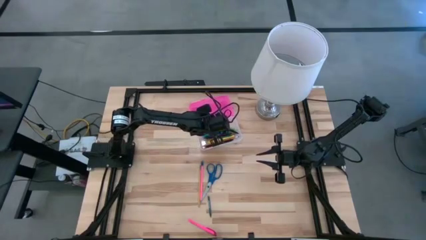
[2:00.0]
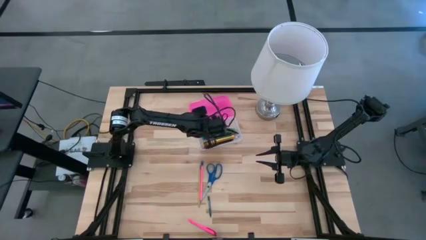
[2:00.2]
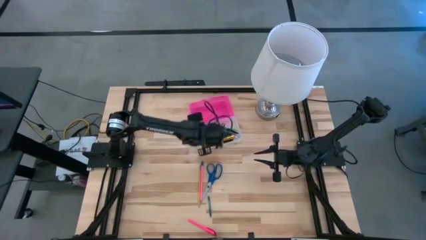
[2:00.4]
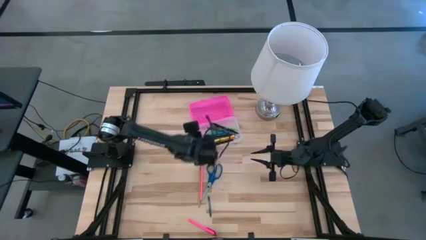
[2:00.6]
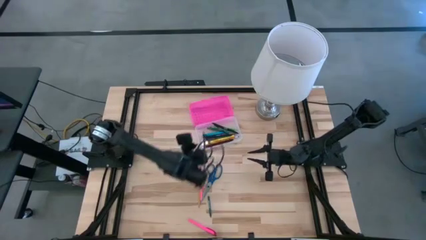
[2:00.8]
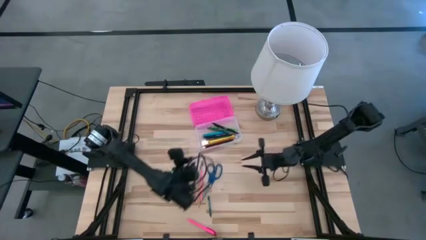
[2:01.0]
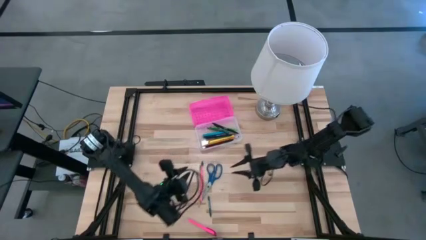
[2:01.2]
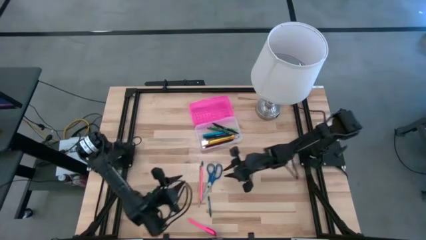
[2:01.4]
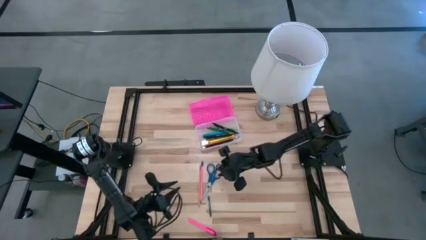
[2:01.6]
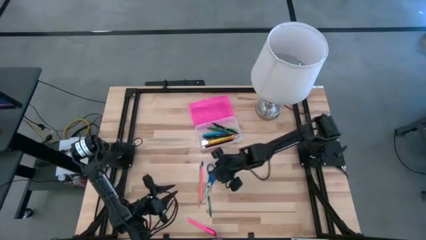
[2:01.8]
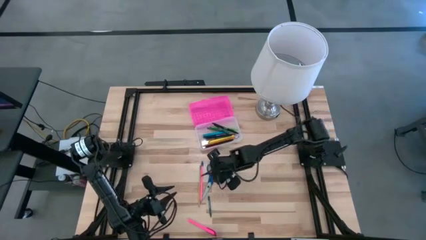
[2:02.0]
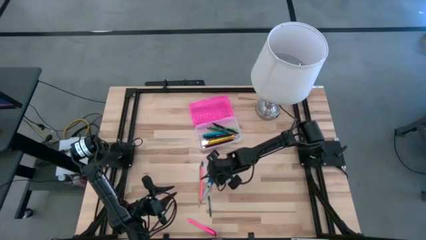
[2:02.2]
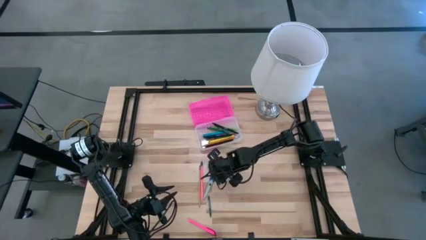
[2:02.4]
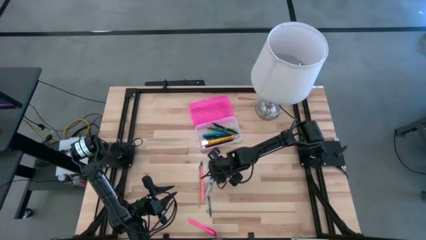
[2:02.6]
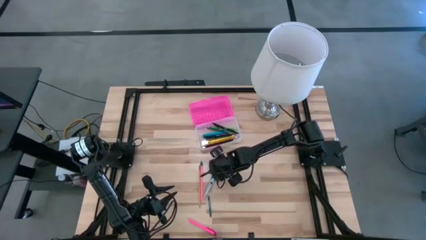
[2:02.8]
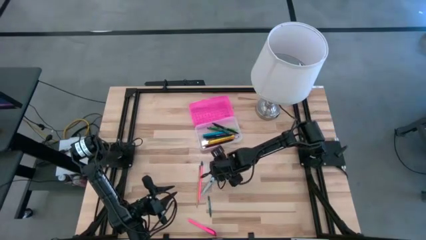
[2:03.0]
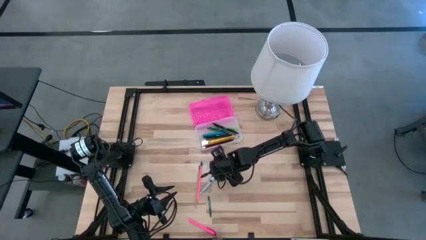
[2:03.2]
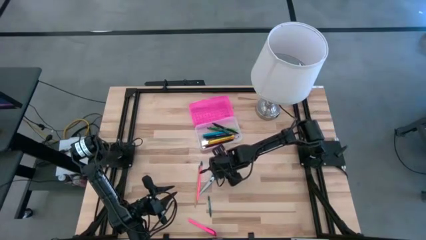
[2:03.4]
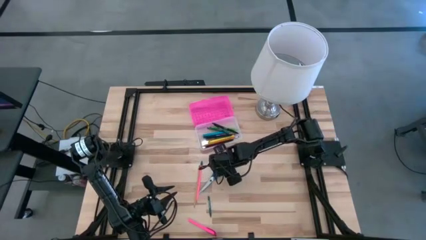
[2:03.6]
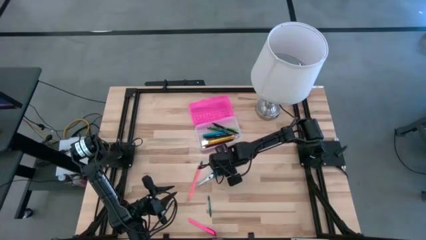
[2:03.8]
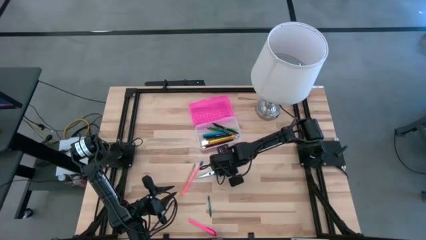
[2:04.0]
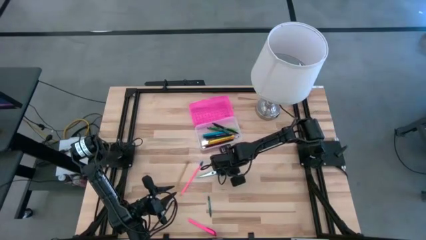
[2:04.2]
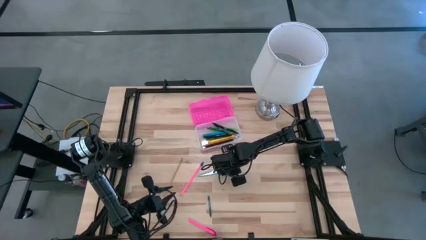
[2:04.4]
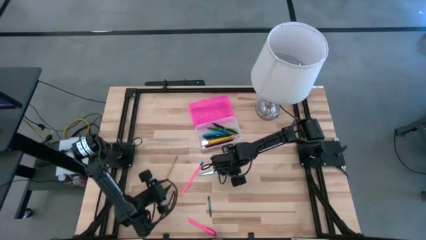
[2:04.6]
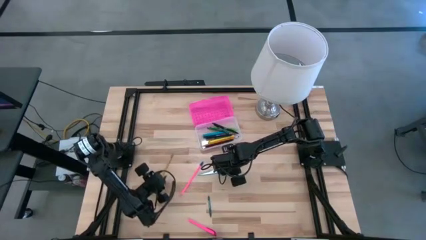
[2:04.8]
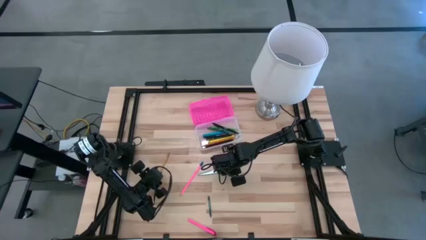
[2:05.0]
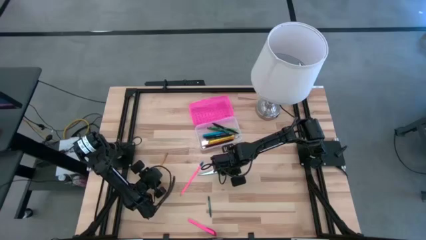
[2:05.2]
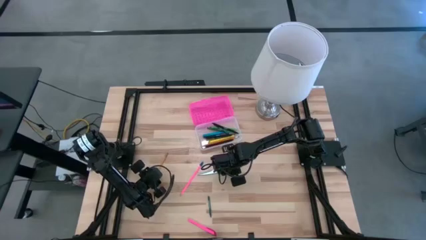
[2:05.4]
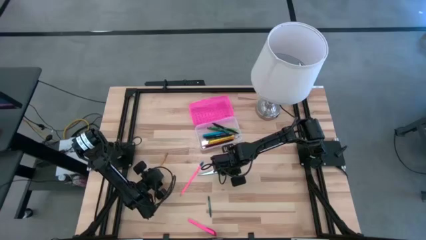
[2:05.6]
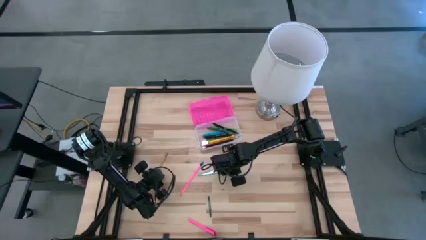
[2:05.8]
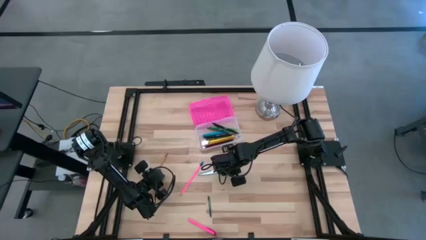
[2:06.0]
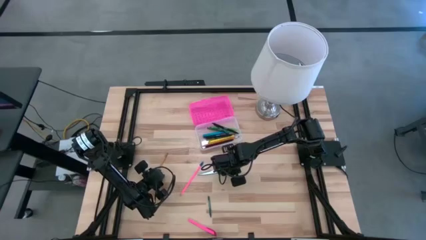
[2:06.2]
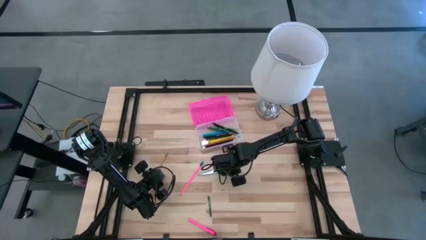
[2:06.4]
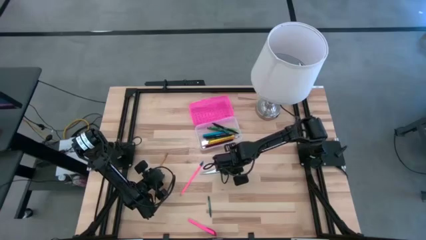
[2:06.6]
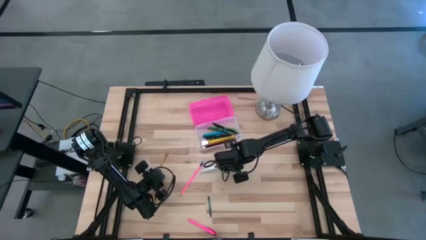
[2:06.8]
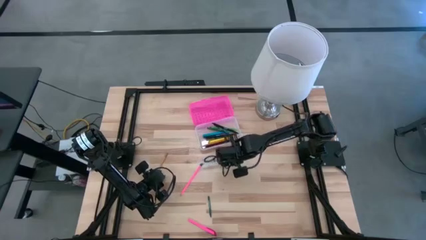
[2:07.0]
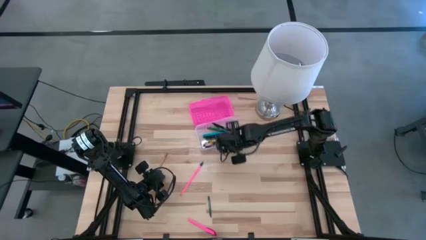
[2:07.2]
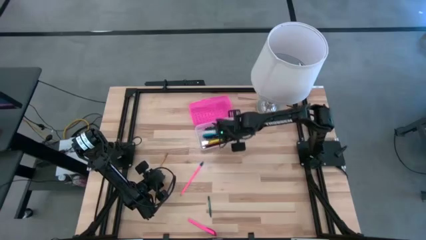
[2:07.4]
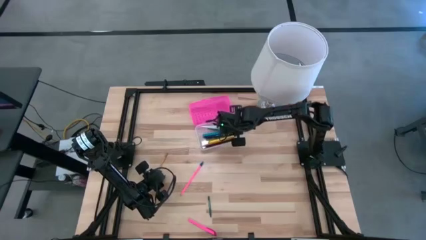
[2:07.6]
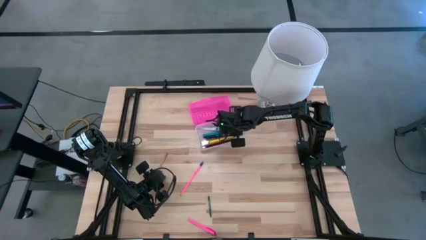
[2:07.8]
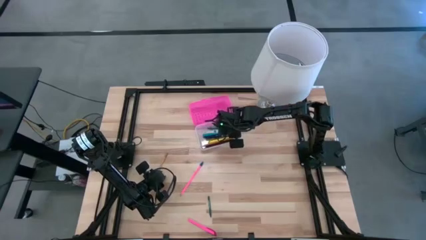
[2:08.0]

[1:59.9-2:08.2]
Task: Pick & place school supplies into a supply box
Put the blue scissors into the pink supply box

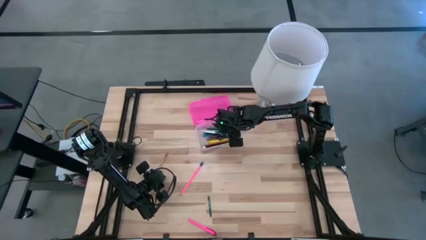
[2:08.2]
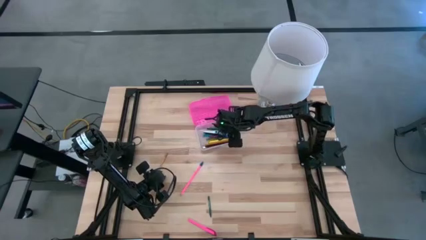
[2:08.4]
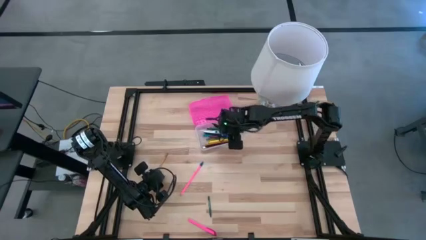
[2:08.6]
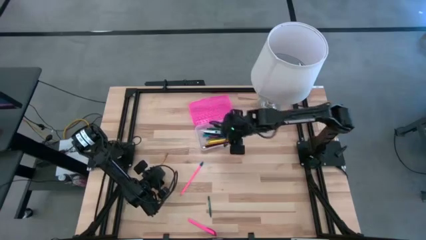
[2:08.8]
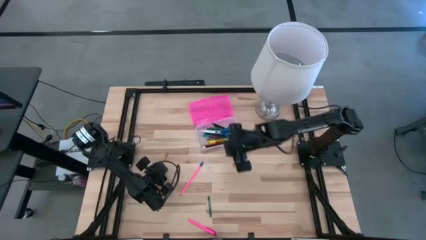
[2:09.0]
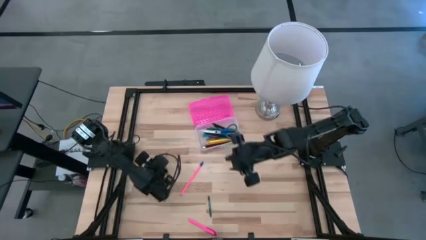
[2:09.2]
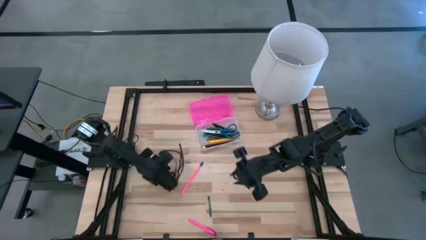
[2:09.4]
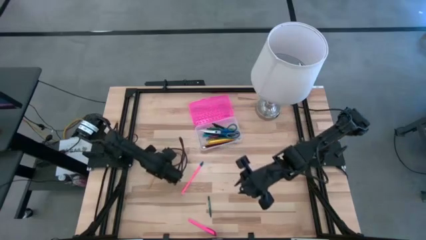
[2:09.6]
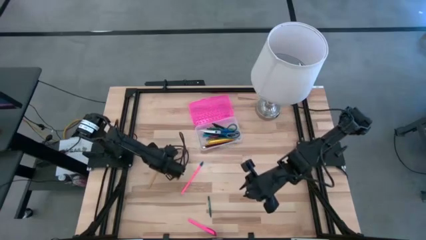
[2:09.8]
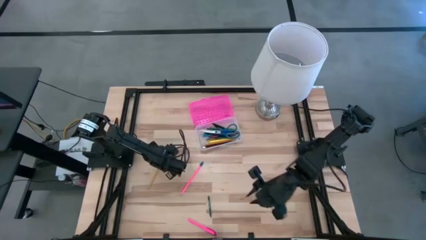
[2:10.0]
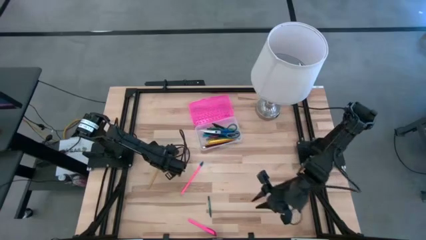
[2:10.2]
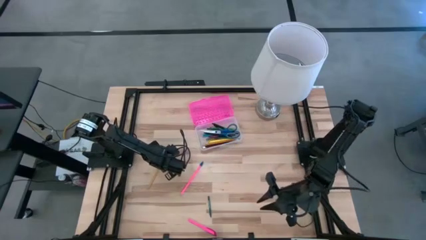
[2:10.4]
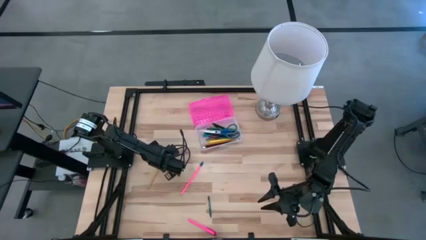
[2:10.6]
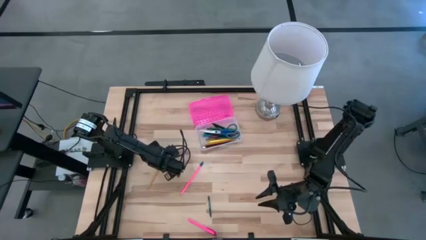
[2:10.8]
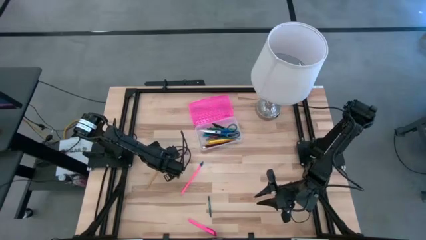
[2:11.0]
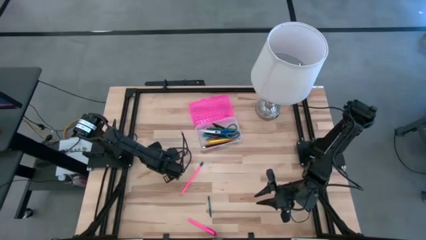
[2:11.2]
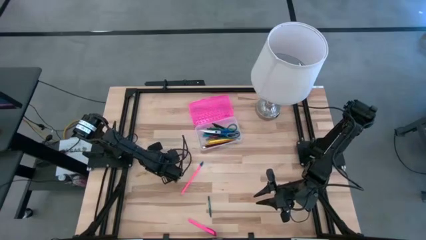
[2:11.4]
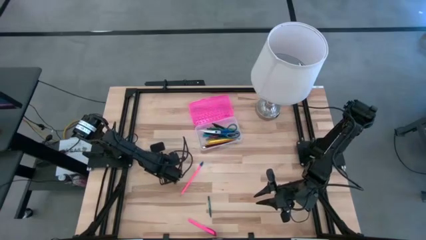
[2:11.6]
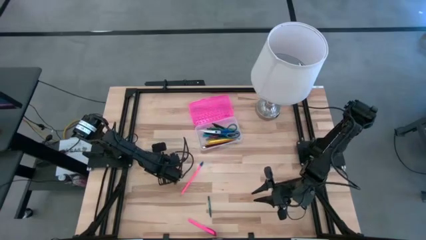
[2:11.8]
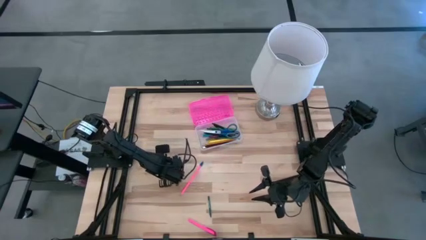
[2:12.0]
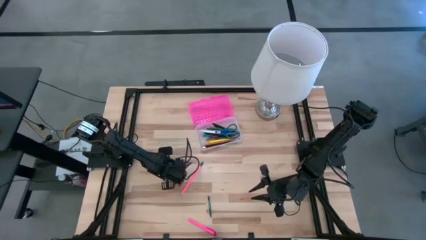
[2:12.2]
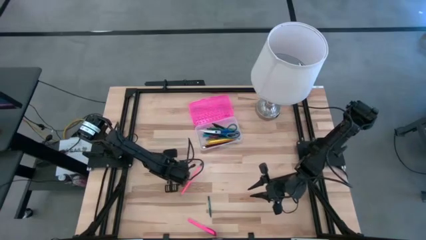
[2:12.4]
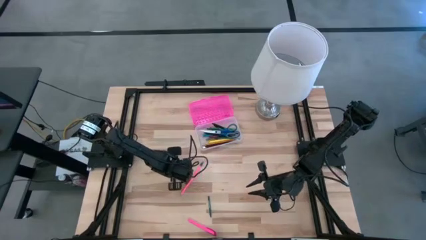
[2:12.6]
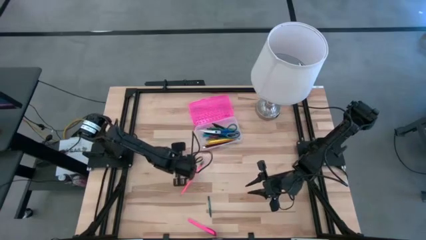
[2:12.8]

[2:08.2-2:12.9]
Put the yellow pencil into the pink supply box

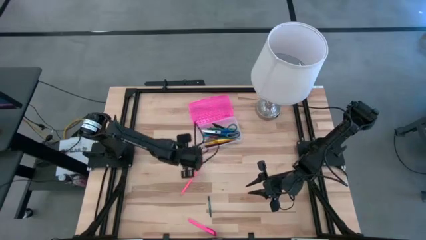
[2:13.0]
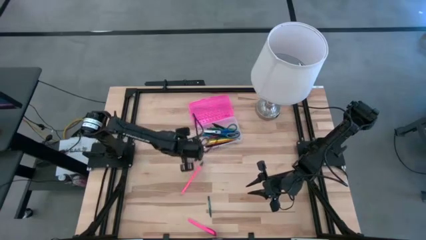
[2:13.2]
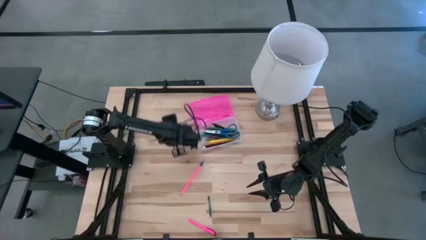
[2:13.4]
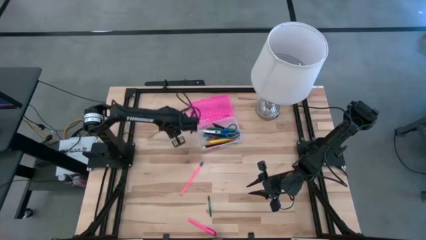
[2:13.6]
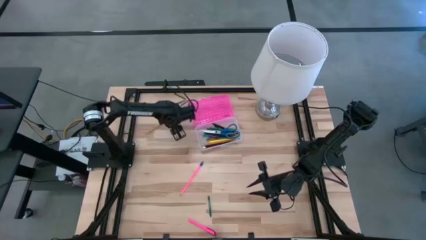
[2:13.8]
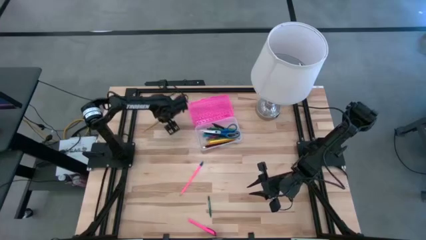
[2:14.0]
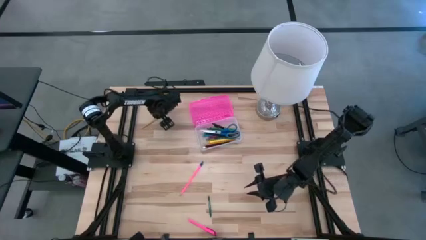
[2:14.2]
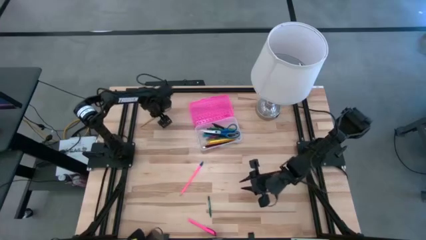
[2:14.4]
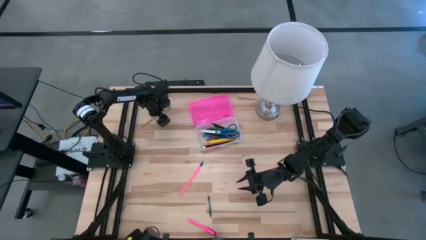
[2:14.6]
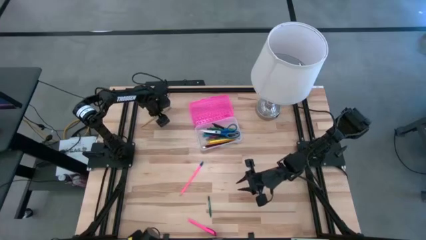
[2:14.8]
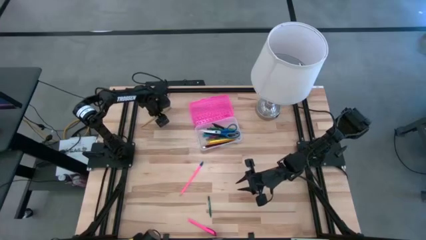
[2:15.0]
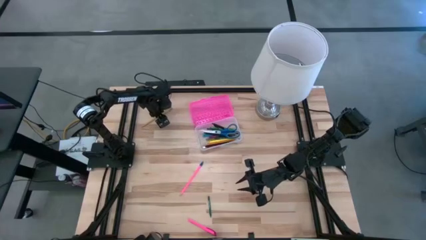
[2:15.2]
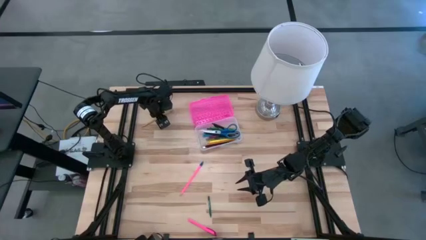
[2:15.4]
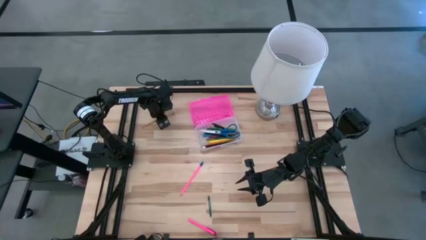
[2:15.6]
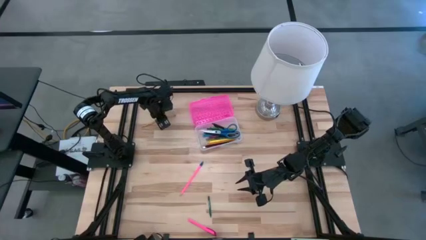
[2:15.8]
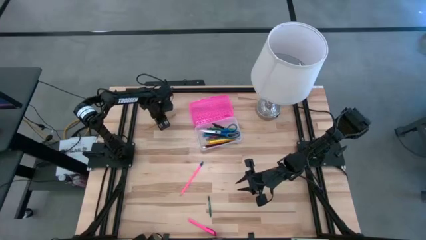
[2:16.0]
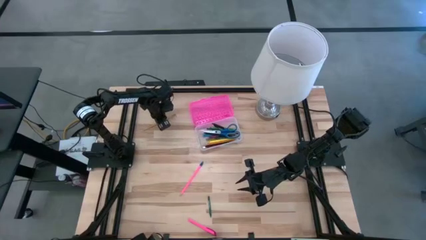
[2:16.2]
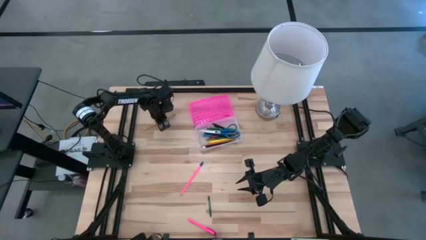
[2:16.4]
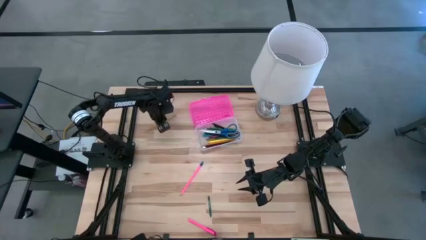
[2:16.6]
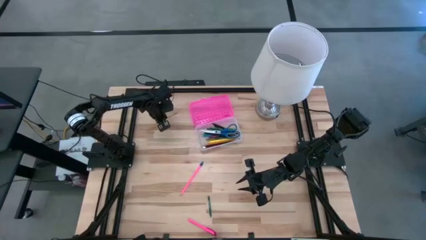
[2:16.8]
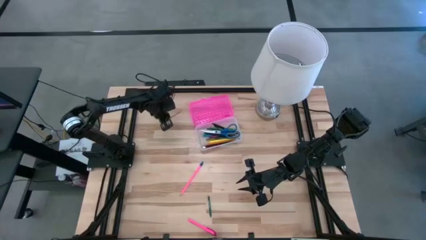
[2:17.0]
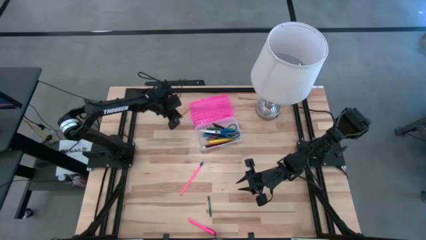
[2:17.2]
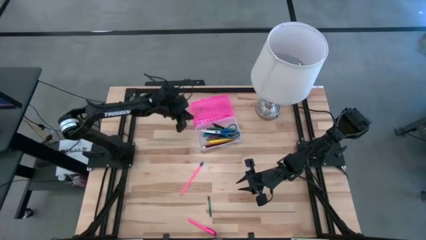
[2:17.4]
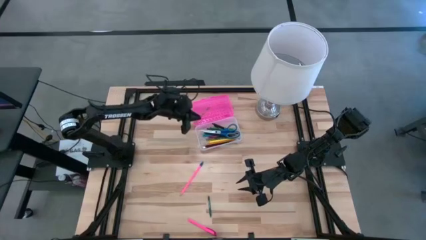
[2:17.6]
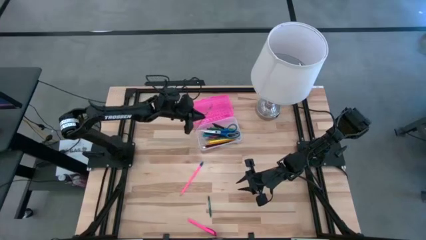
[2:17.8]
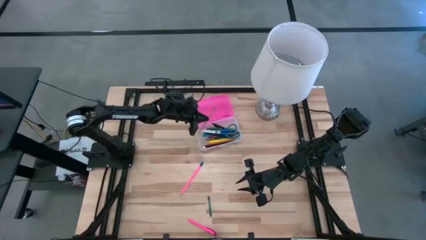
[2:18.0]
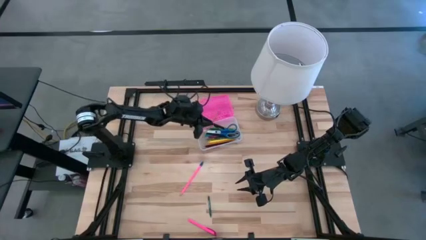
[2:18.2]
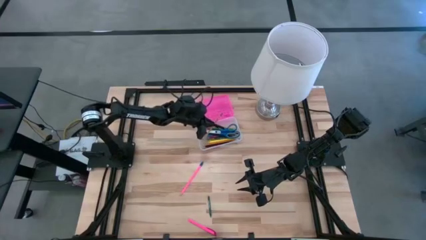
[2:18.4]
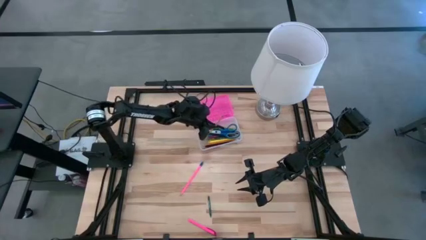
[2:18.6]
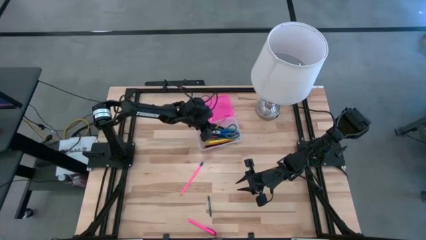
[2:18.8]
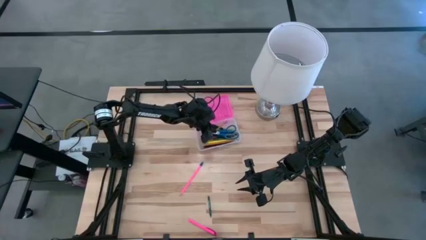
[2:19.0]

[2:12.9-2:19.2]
Put the yellow pencil into the pink supply box
